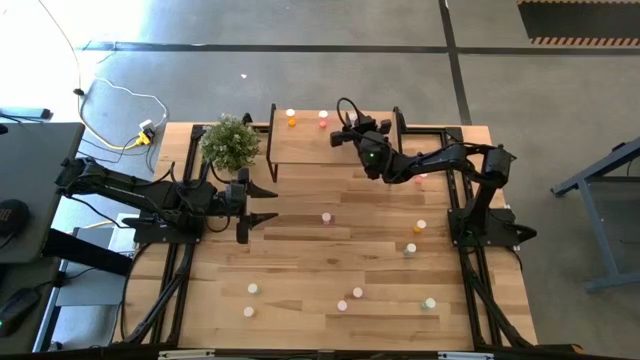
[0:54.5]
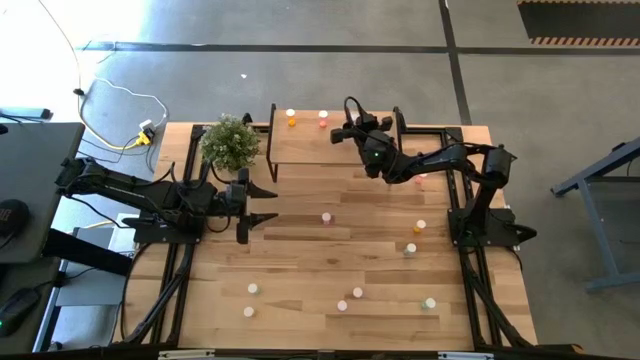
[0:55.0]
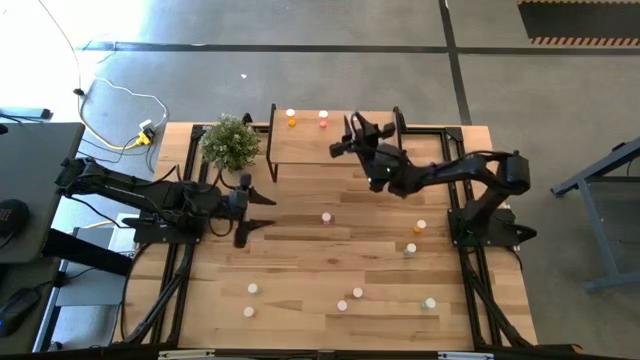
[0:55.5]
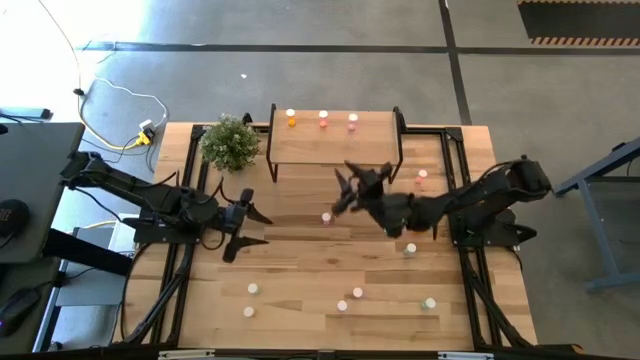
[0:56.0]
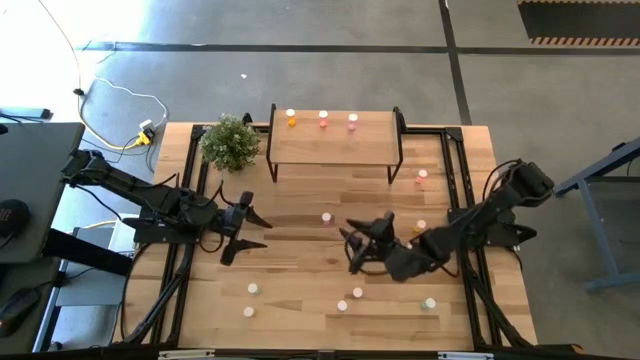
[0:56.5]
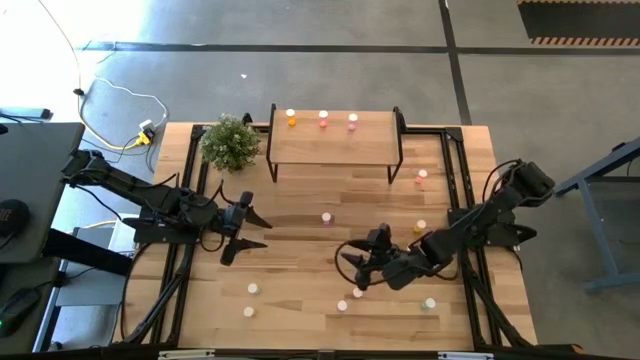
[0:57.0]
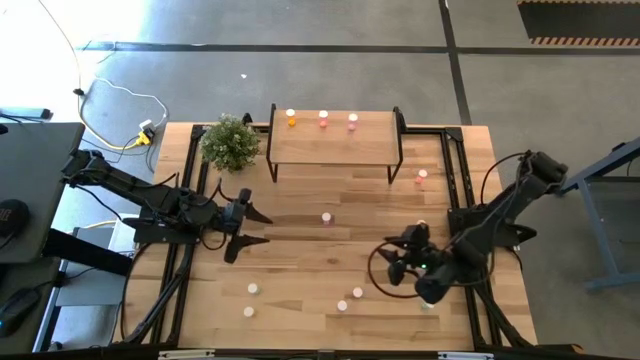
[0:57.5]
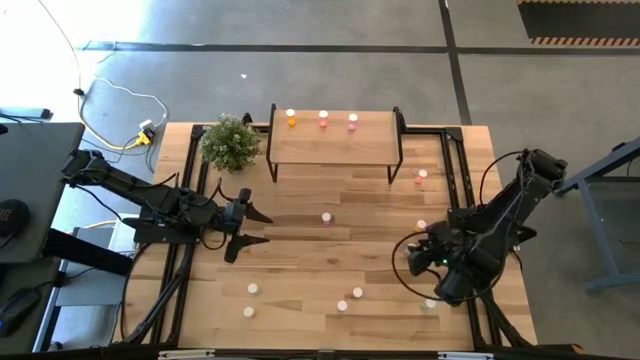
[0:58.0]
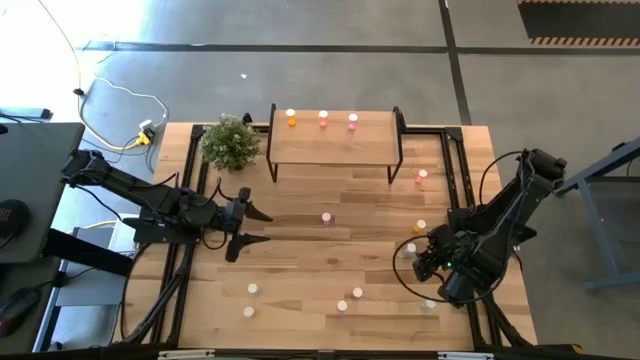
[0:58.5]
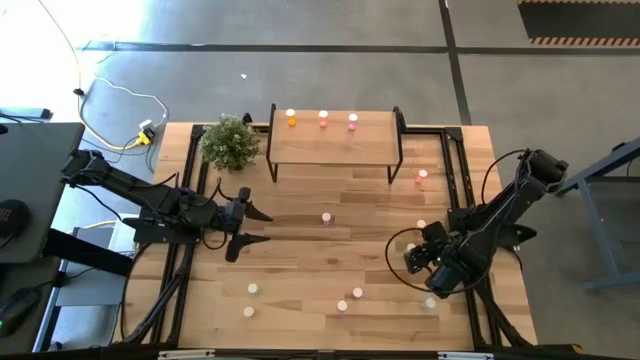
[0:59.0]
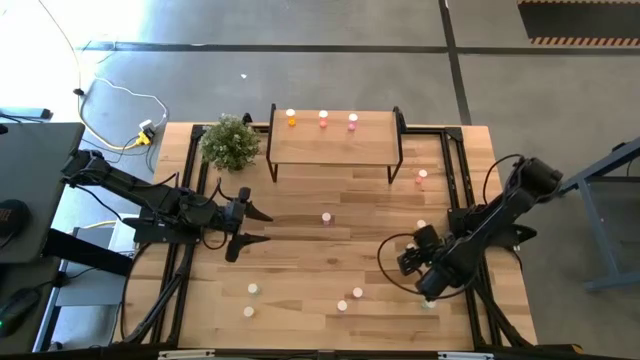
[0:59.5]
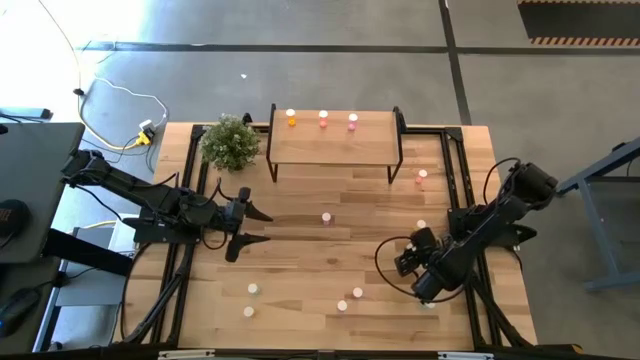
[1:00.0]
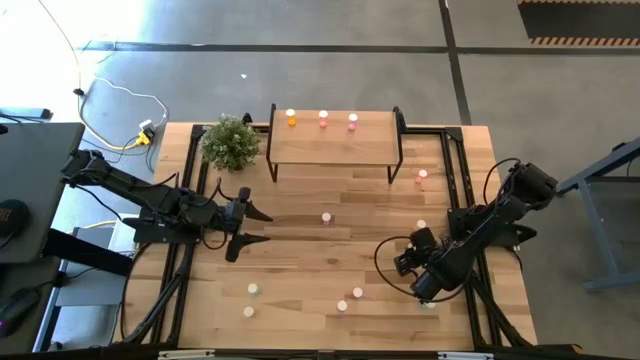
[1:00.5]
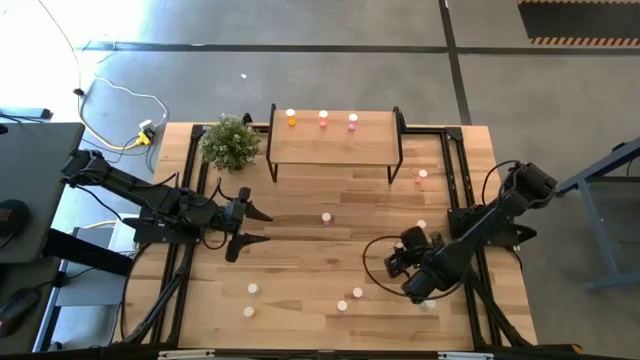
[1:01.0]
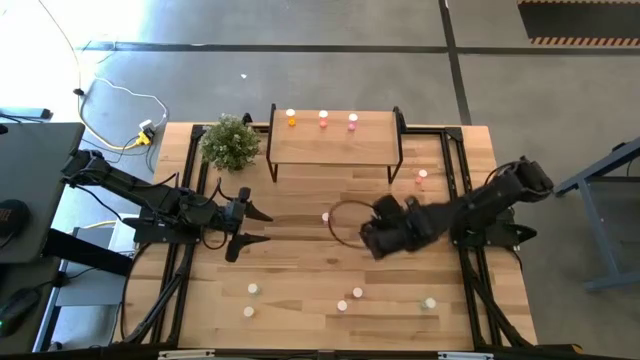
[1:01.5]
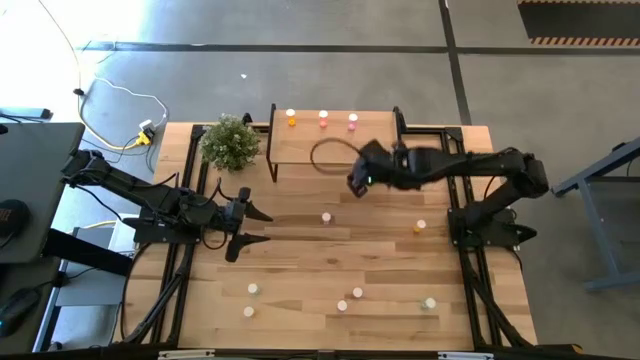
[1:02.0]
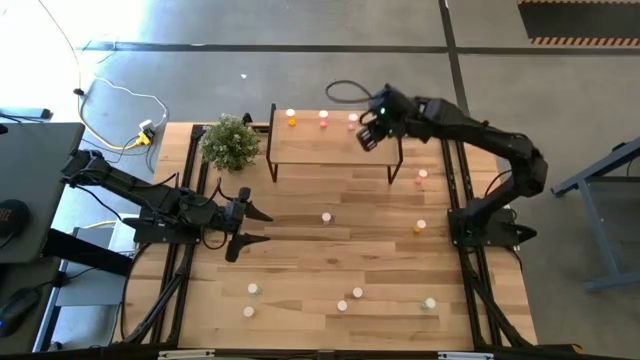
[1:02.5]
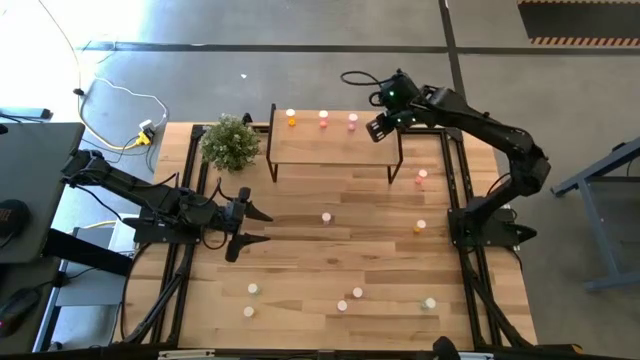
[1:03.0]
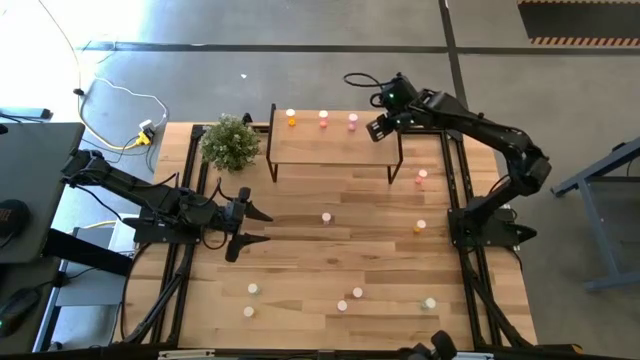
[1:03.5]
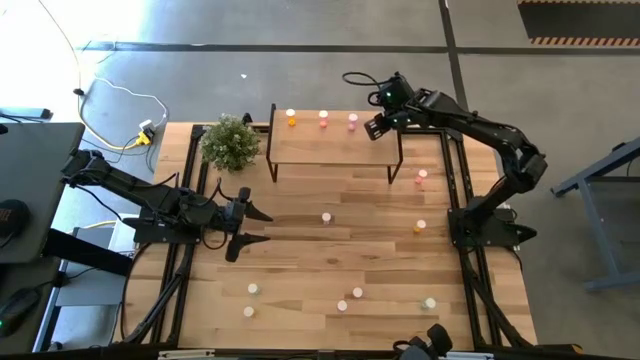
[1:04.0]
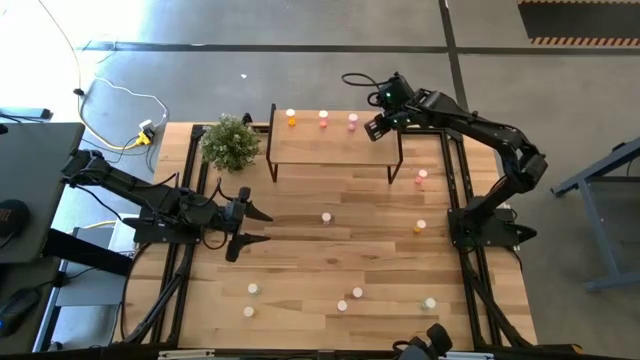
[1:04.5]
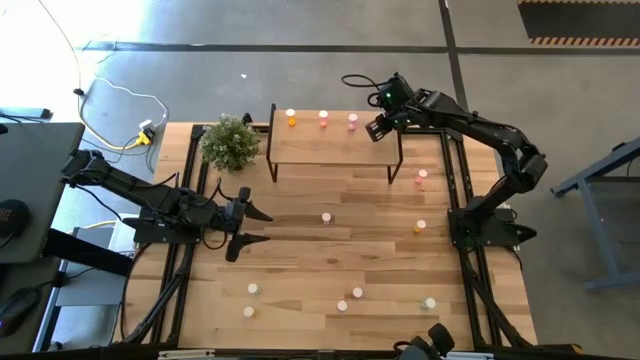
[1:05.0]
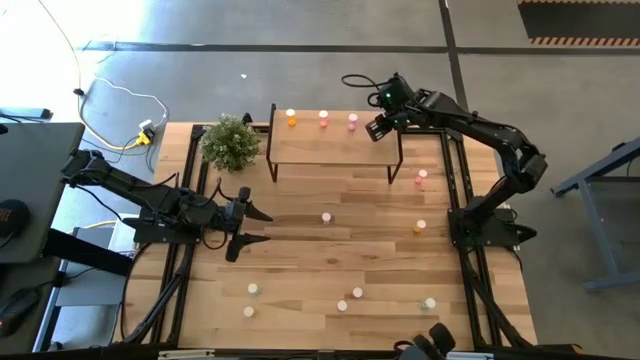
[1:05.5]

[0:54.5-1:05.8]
Task: Pick and place medicine bottles onto shelf by color
Put the top green pill bottle on the shelf

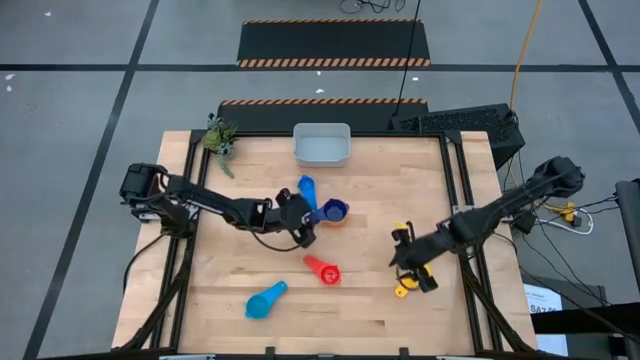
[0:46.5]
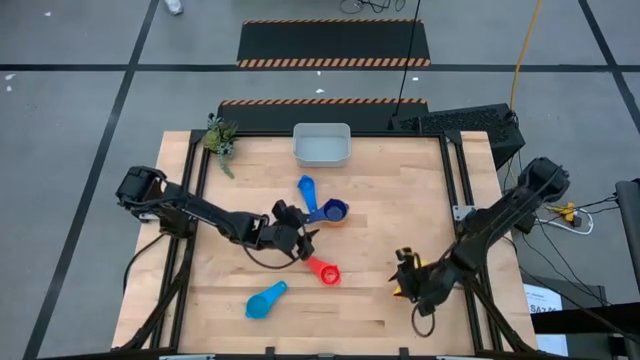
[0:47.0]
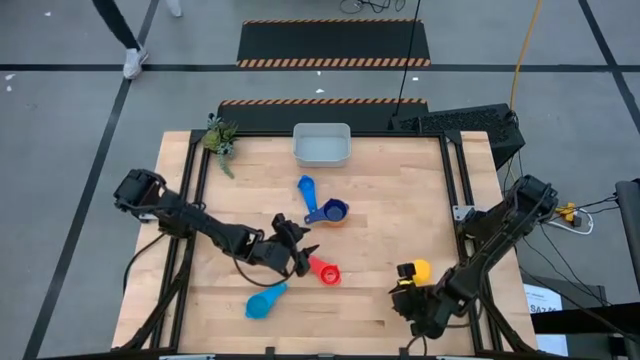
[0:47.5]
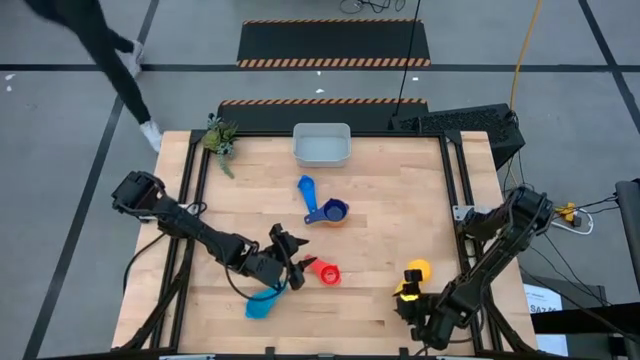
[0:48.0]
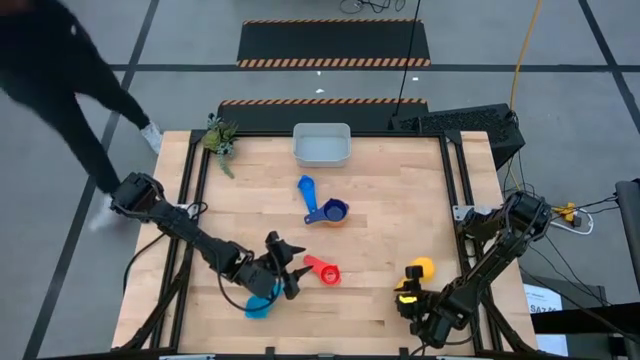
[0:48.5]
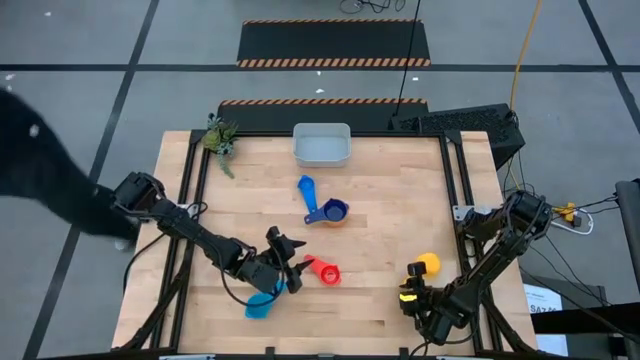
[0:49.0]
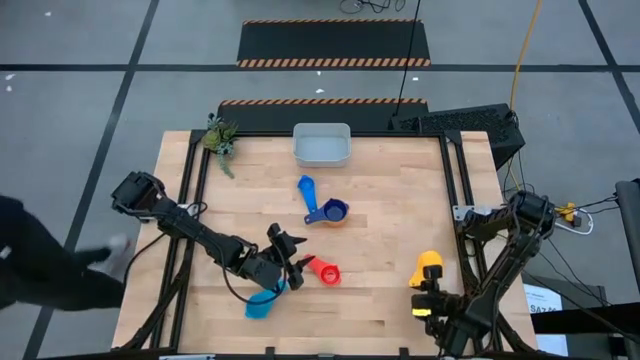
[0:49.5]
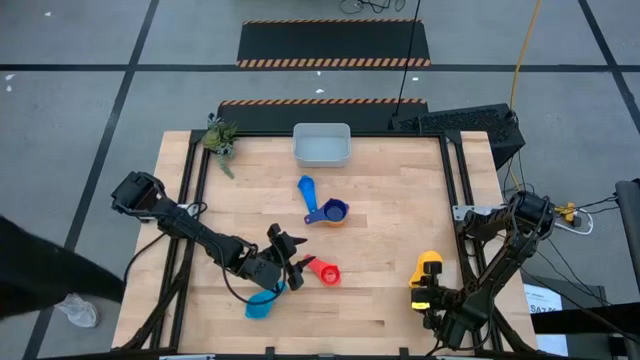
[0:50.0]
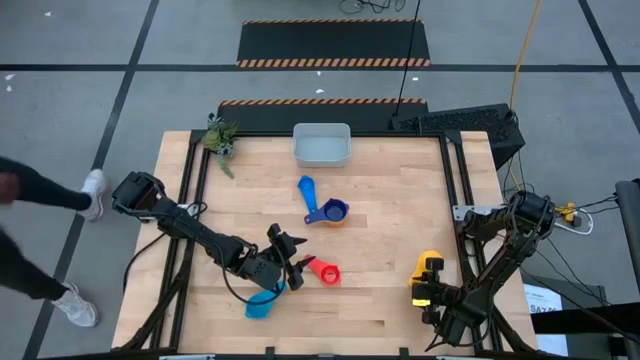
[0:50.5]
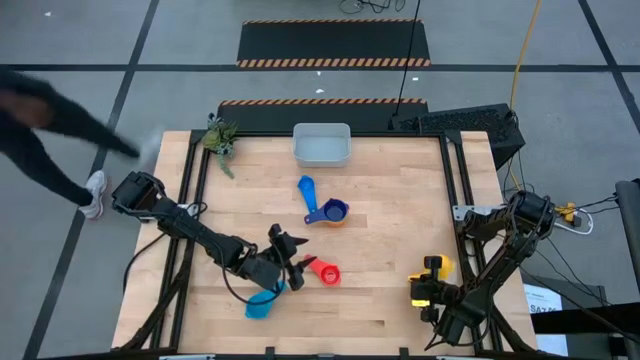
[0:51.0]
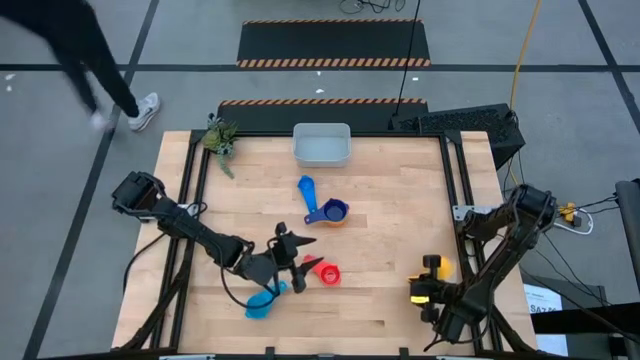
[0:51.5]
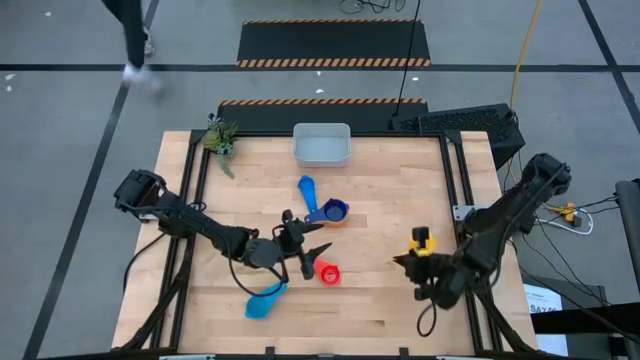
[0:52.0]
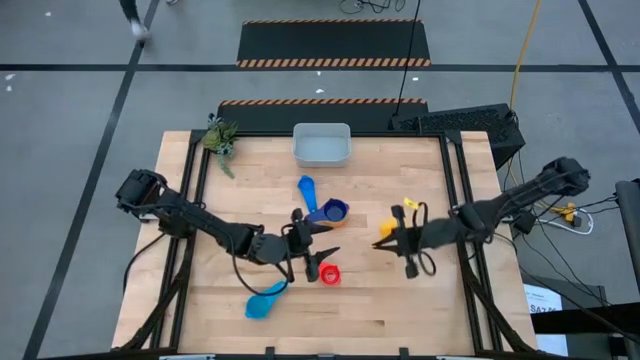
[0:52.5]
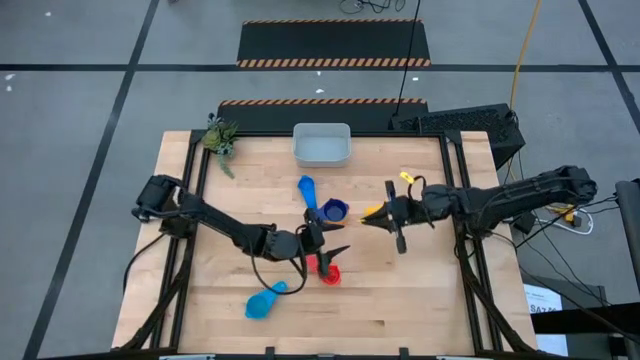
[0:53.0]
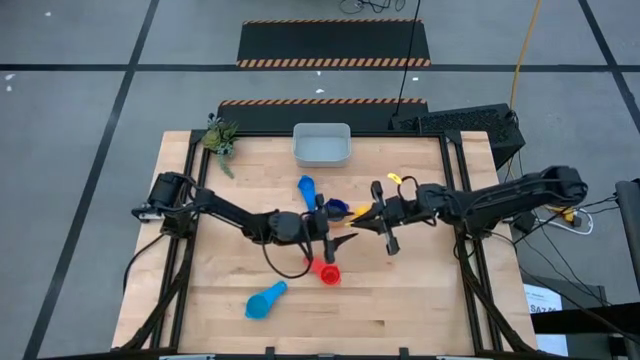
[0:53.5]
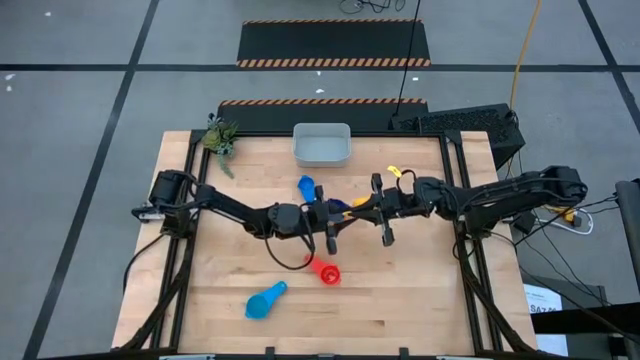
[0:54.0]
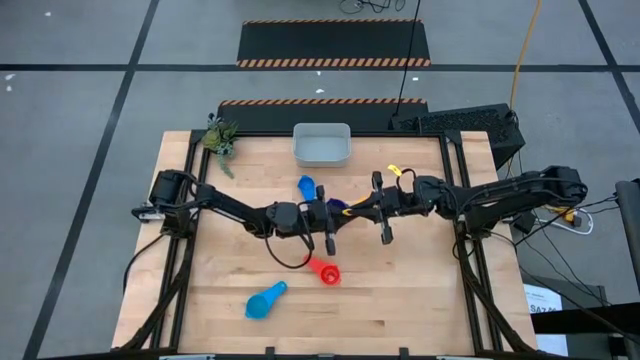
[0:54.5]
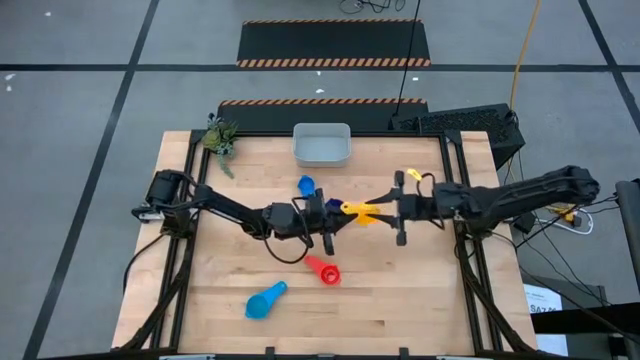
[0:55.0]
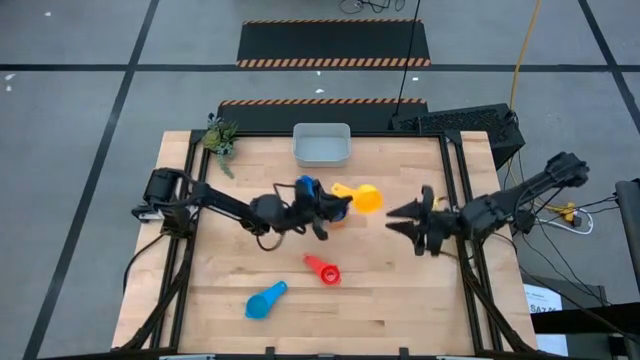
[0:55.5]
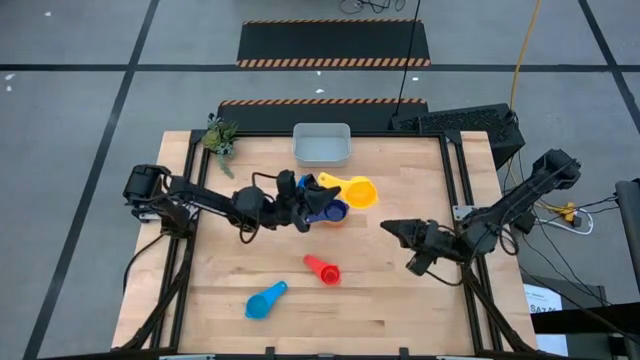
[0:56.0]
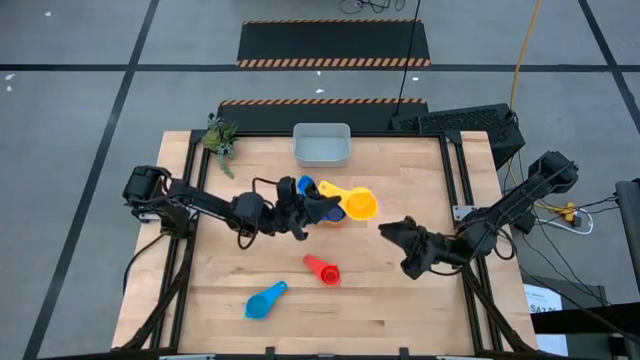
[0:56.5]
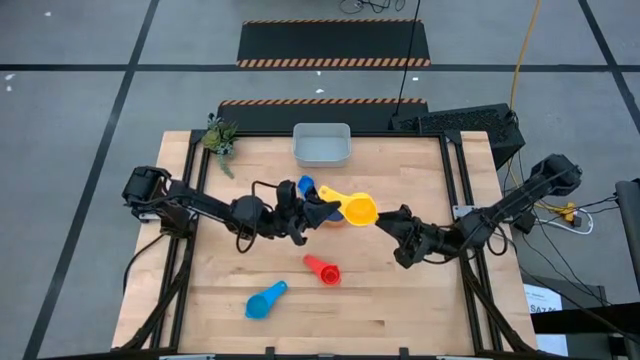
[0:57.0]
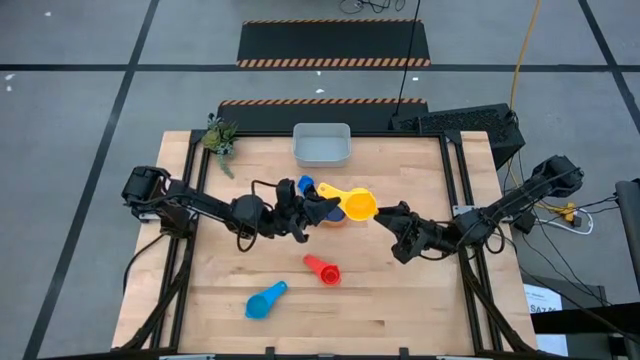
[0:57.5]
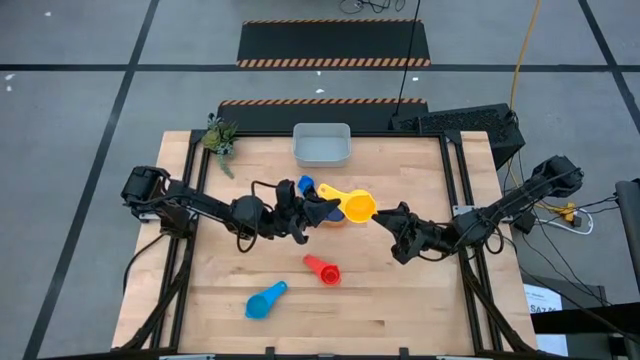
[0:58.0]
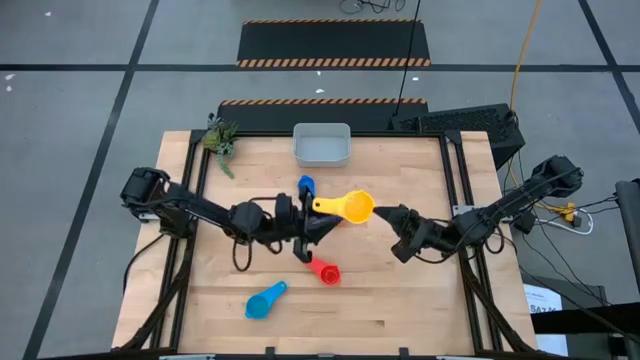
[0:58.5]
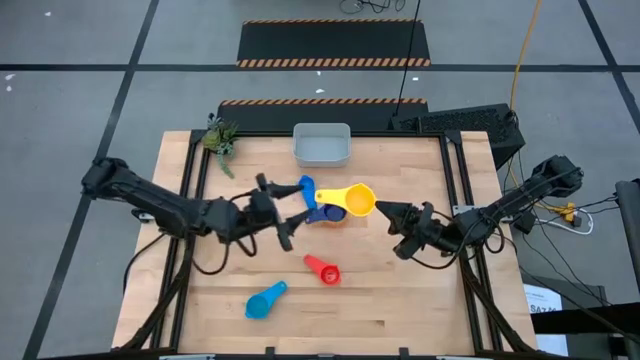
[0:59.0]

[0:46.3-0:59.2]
Task: Nest measuring cups in basket
Stack the yellow measuring cup into the purple measuring cup
